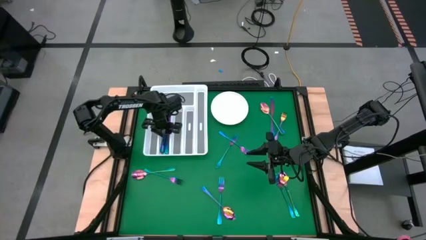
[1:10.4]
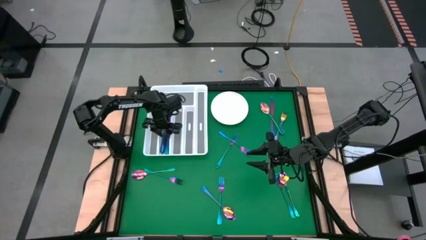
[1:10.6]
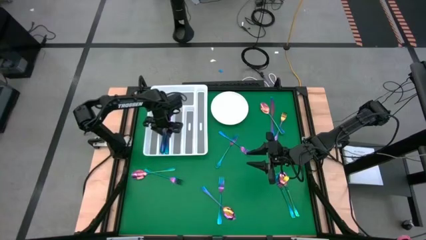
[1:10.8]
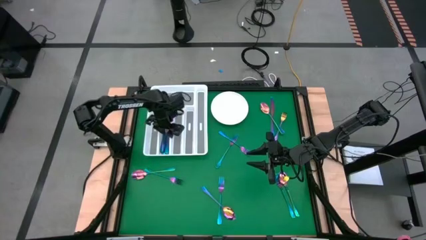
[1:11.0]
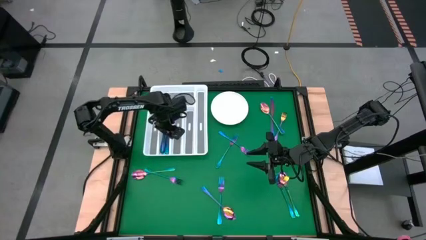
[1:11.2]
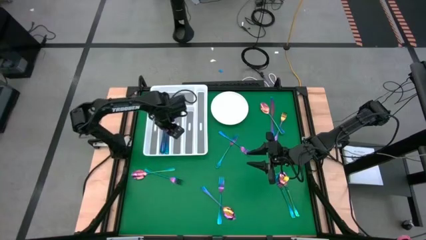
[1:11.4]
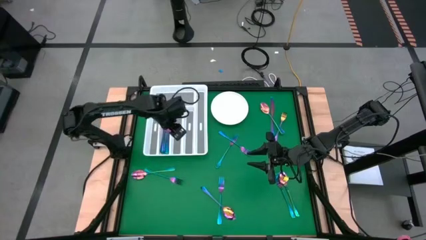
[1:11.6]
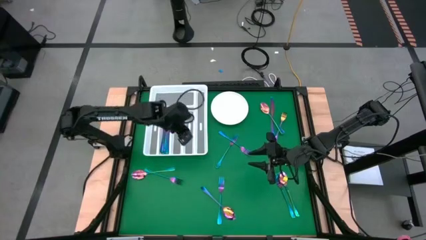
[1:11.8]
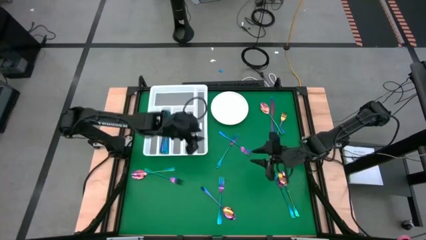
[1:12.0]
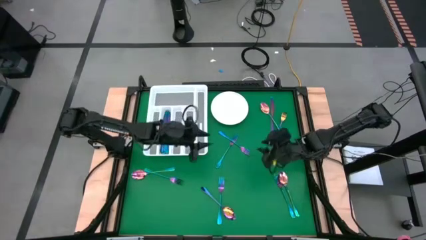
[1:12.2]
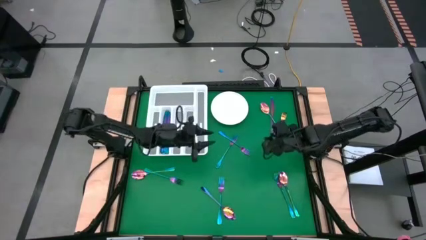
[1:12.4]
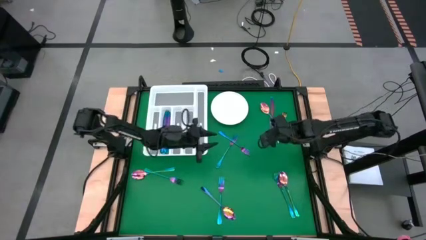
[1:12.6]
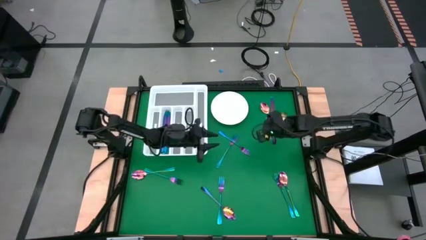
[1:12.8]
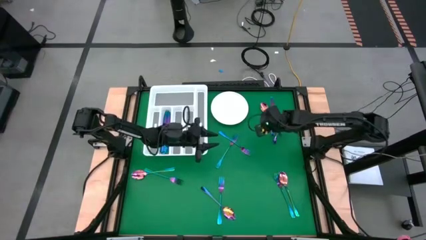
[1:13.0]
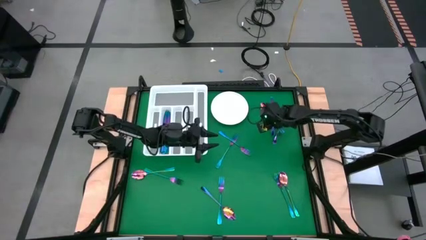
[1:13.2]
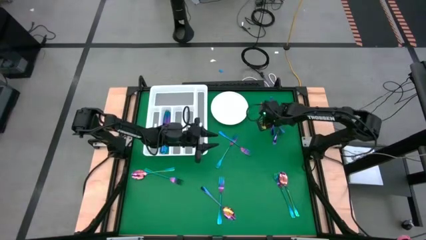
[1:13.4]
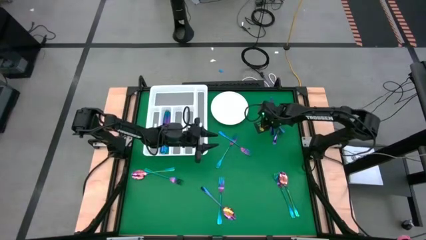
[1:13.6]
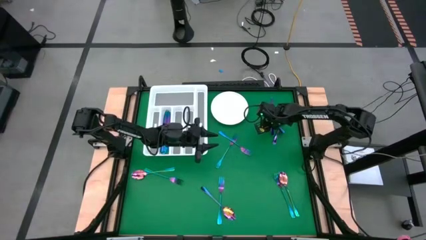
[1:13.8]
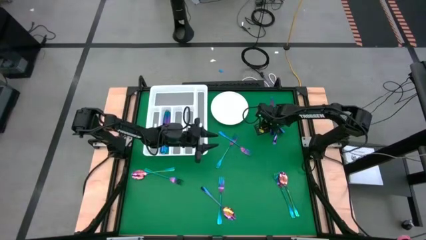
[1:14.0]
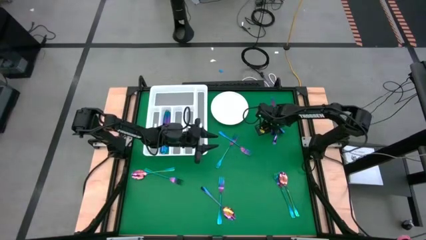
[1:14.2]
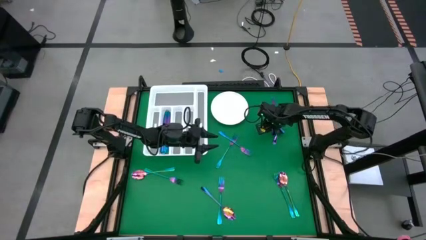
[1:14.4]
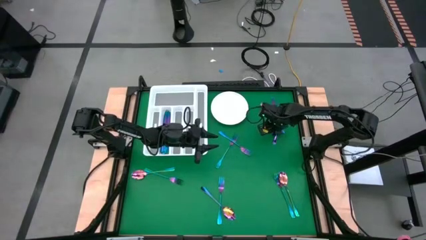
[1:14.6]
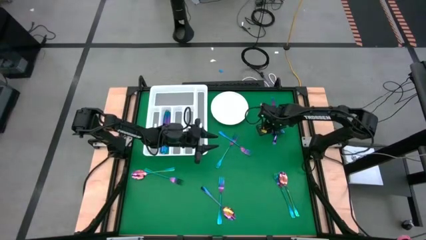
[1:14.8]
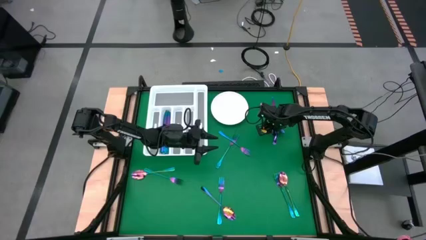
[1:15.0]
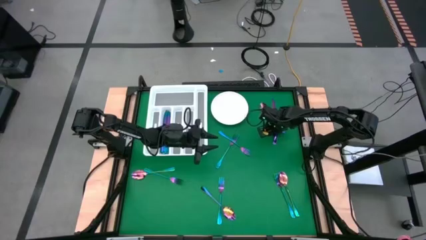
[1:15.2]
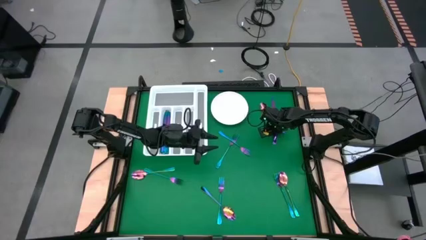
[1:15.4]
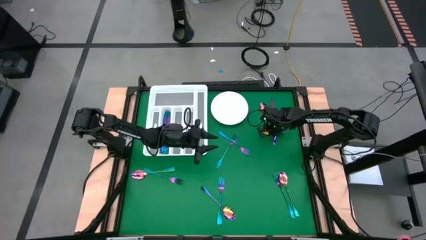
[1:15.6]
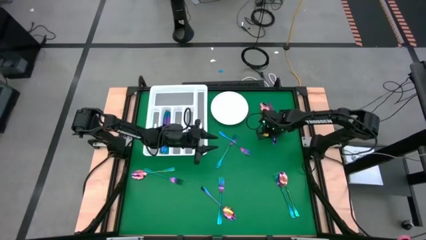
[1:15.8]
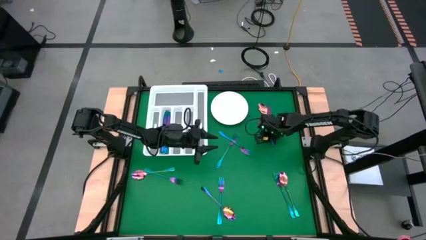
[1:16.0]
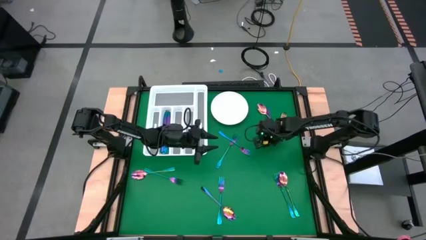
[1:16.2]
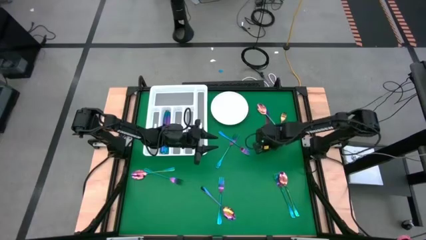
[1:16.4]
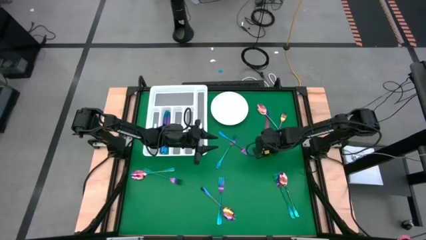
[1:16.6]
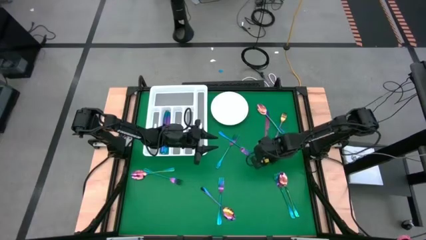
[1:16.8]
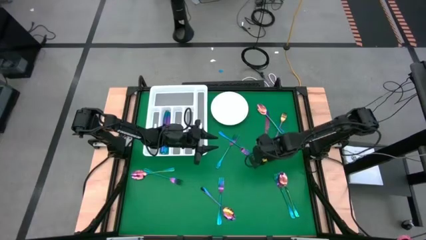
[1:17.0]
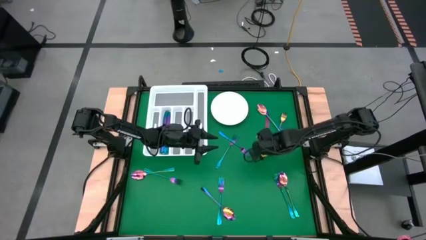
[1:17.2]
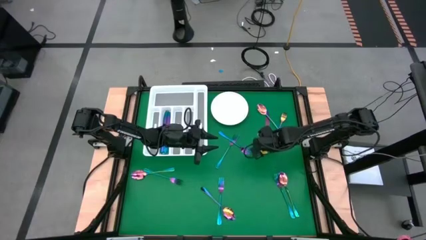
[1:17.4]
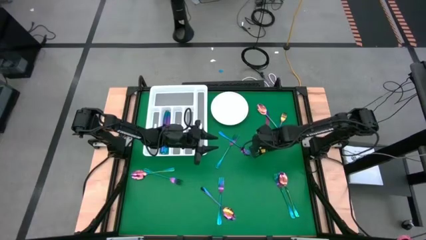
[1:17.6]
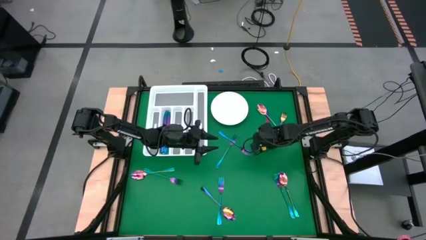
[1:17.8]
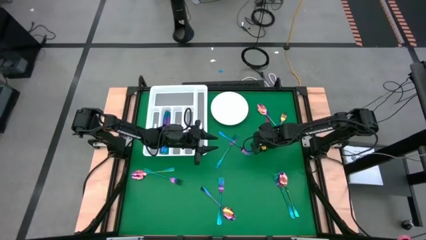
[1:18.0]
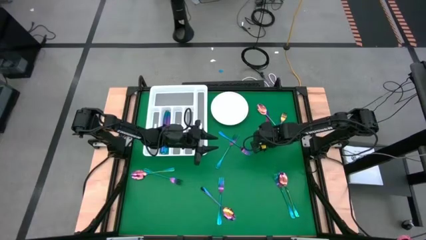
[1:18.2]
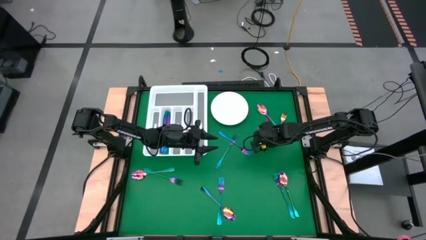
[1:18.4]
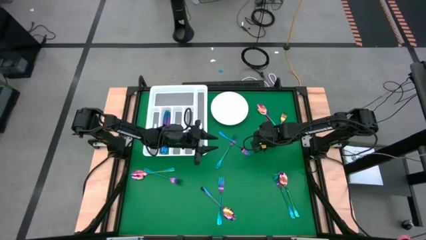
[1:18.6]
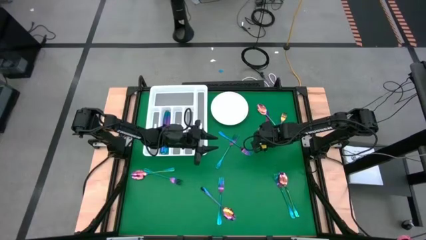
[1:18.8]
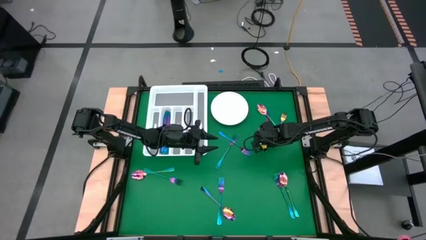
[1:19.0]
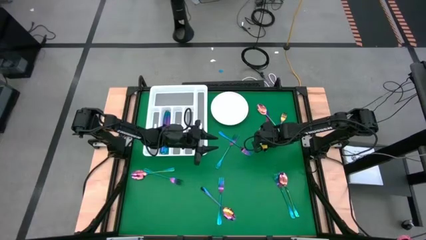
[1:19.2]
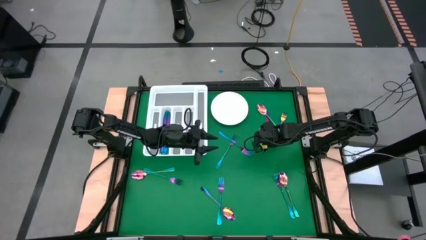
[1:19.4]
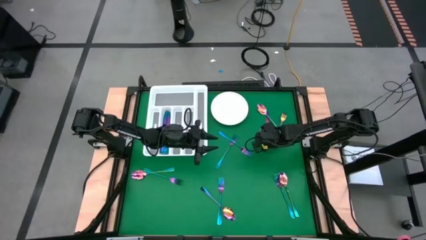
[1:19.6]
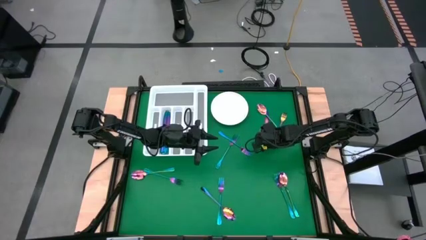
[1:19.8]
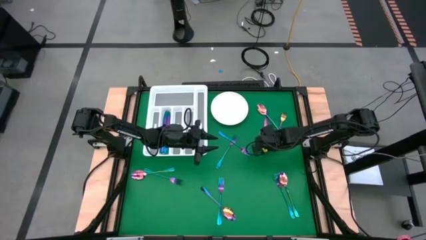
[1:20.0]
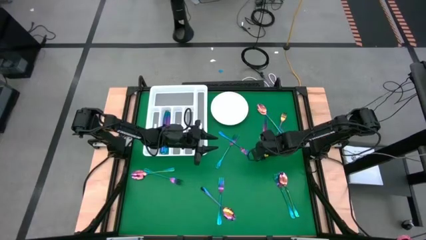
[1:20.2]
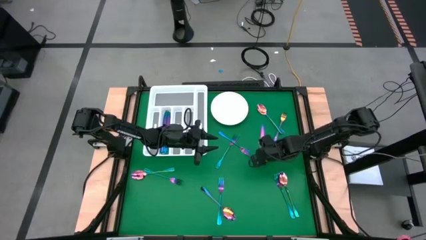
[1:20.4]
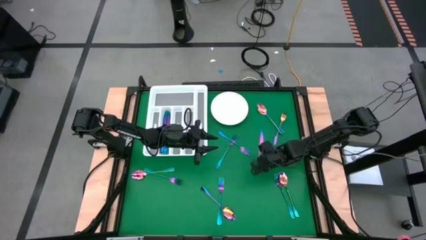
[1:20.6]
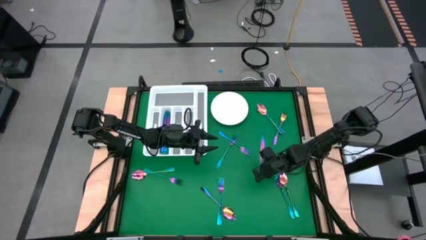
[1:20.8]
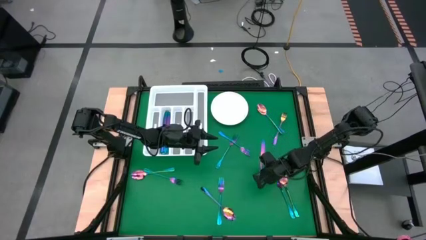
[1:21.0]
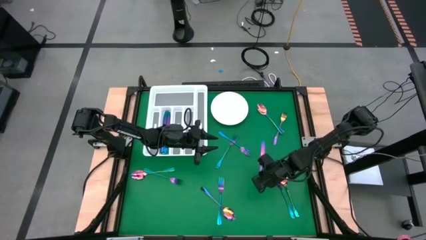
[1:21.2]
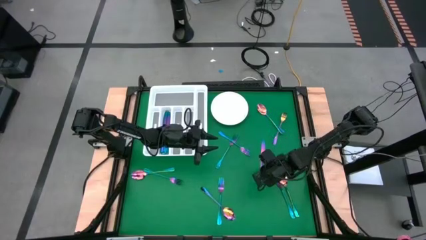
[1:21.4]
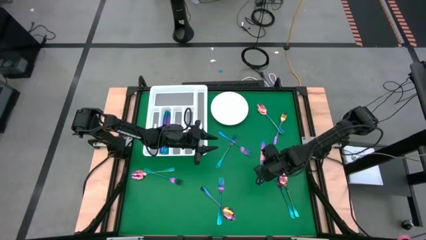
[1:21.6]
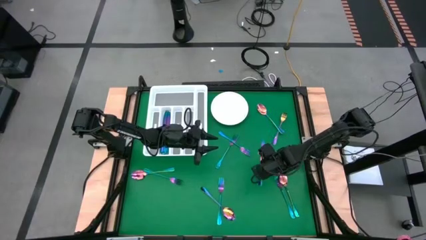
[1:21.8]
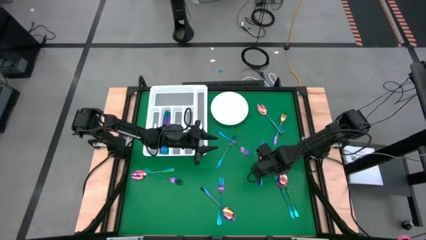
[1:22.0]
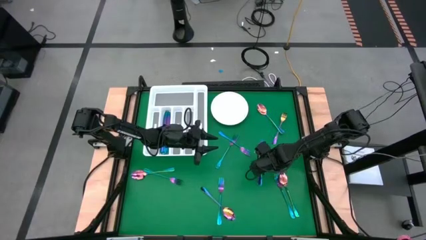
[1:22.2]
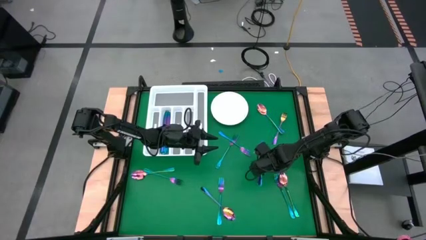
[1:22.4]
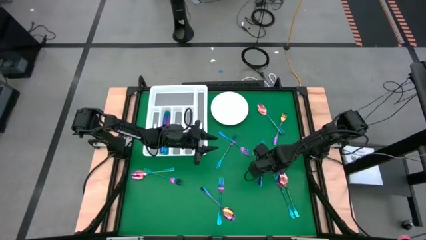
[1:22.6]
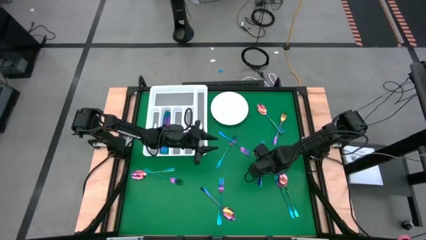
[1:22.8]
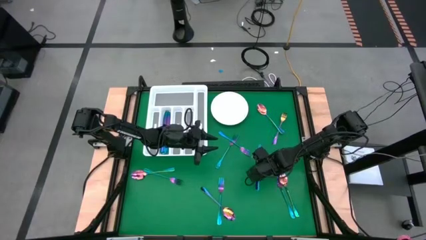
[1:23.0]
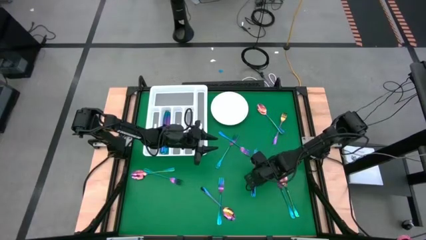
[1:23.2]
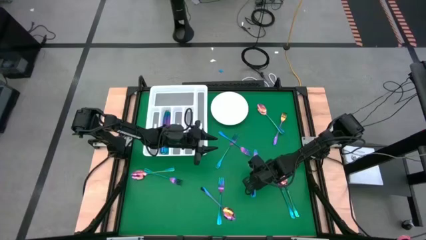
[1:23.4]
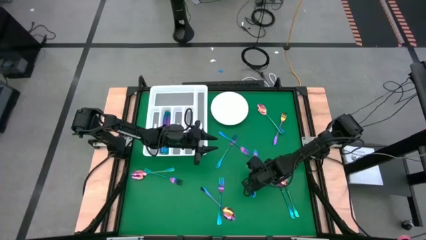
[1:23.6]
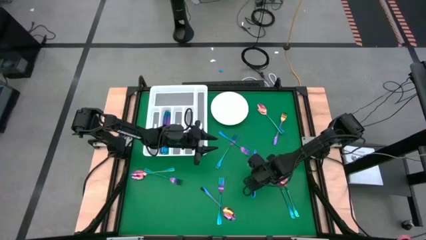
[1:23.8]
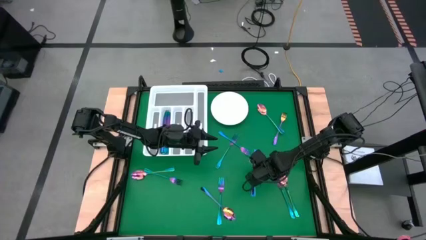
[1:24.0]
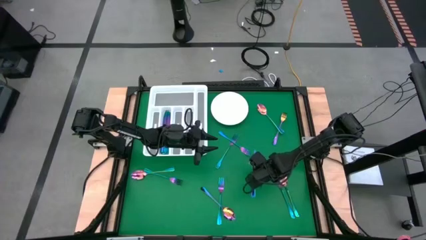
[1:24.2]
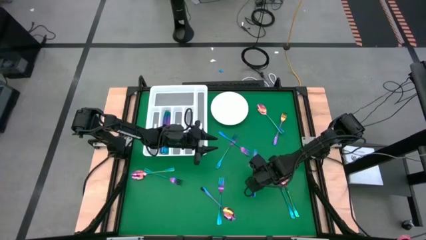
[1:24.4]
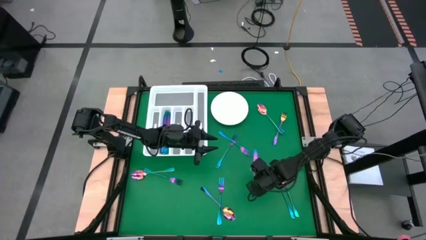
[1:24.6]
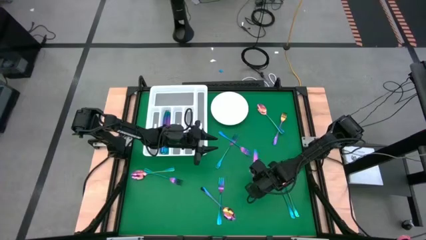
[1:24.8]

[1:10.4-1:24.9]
Task: Sort silverware
Put the blue knife into the silverware tray
